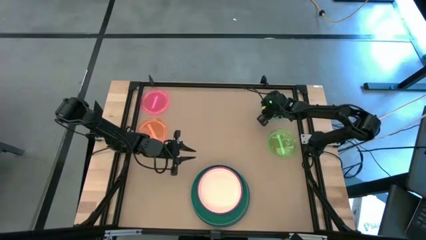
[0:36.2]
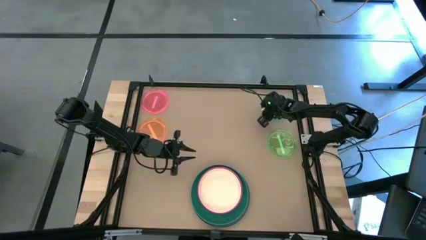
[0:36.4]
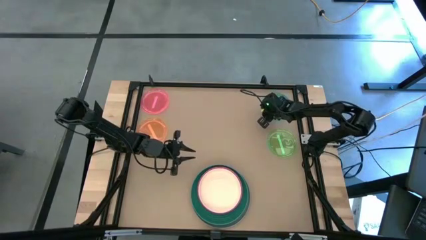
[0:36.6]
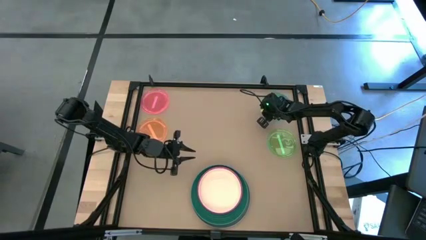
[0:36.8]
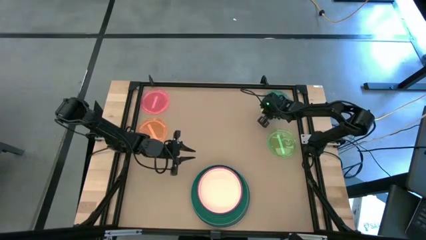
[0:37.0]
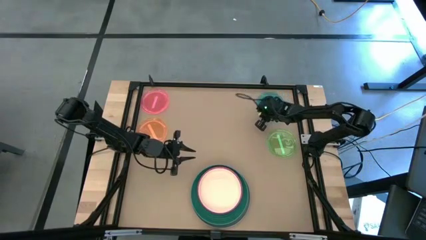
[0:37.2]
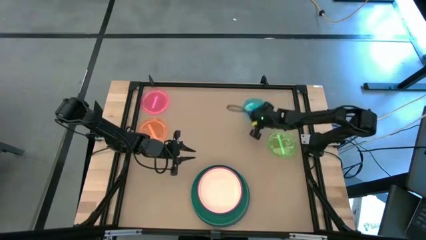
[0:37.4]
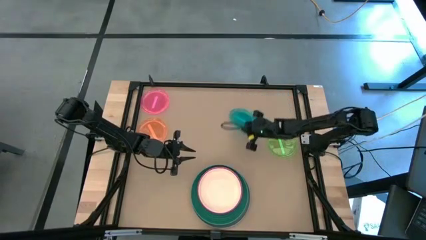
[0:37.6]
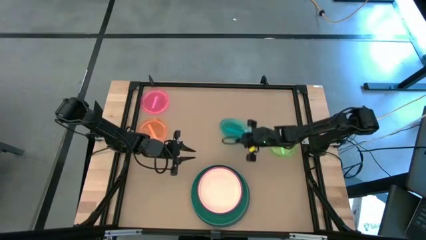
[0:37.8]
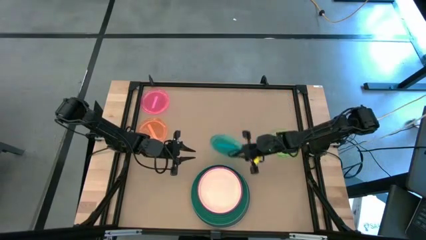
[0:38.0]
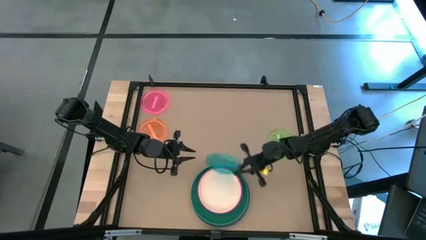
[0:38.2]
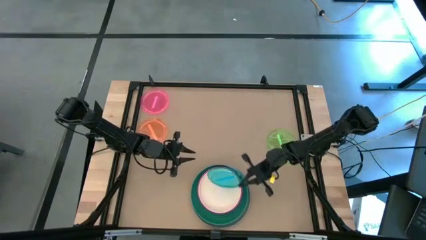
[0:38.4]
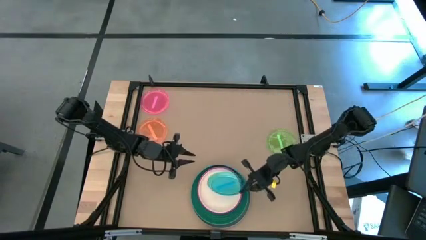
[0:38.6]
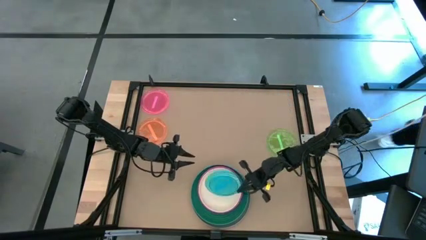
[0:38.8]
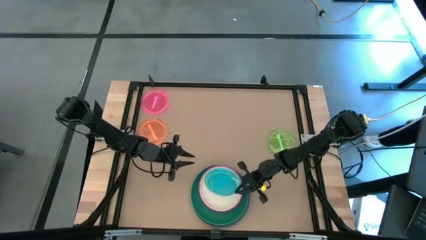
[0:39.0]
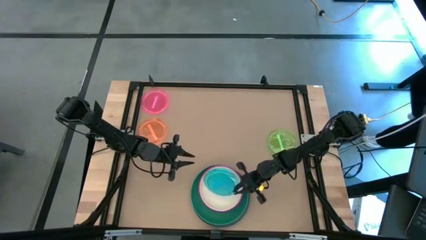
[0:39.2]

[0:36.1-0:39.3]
Task: Stack plastic plates
Stack the light blue plate on top of the light orange plate

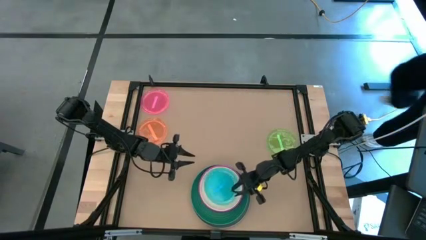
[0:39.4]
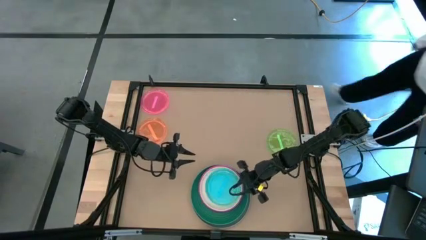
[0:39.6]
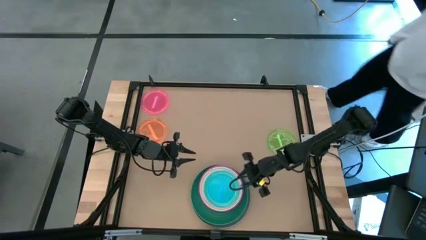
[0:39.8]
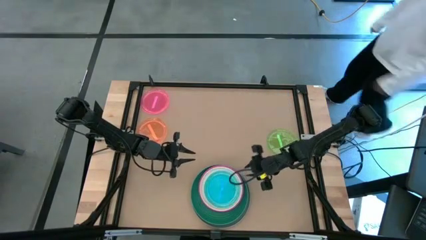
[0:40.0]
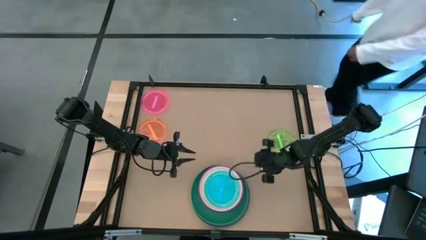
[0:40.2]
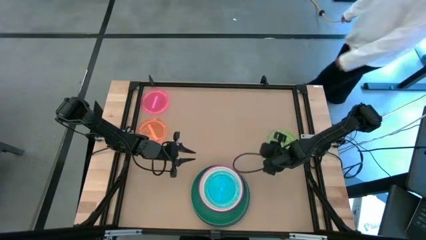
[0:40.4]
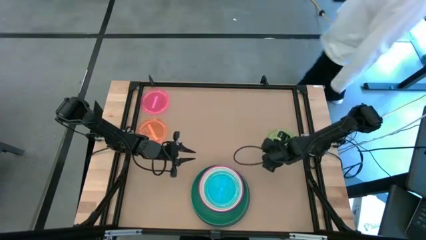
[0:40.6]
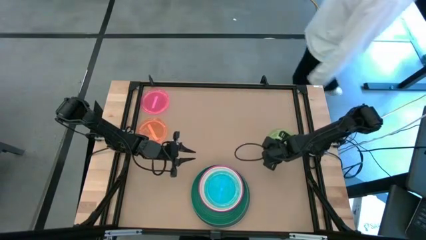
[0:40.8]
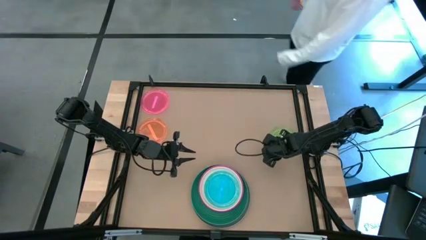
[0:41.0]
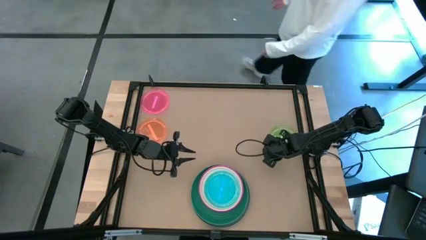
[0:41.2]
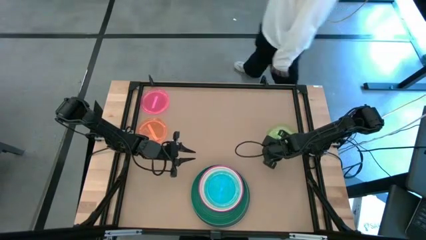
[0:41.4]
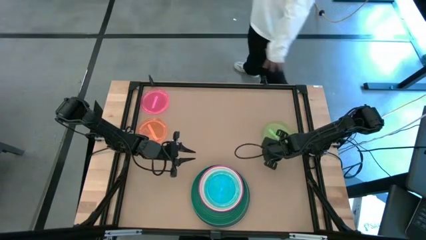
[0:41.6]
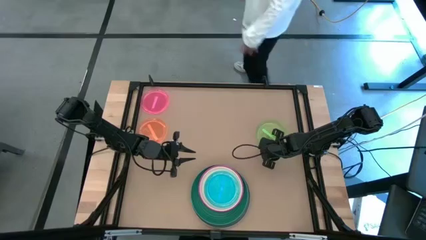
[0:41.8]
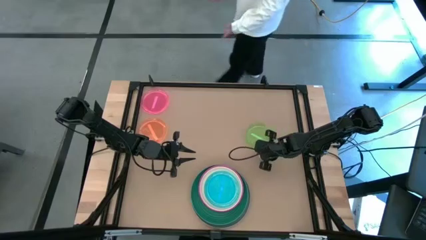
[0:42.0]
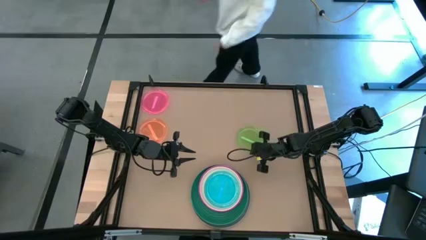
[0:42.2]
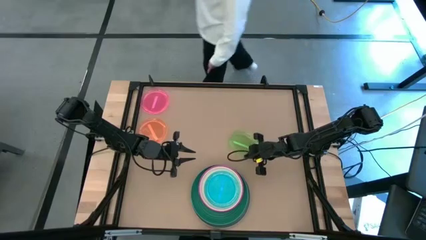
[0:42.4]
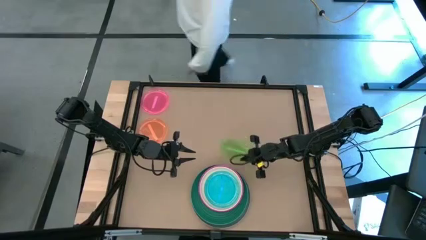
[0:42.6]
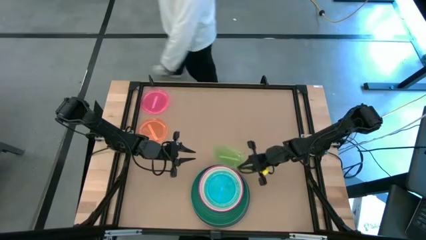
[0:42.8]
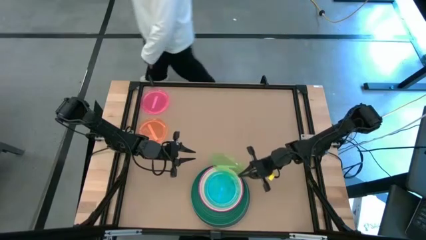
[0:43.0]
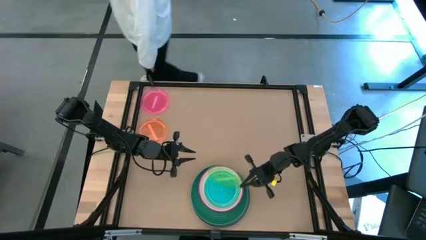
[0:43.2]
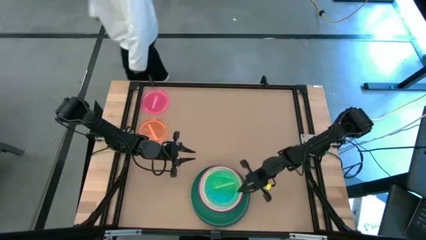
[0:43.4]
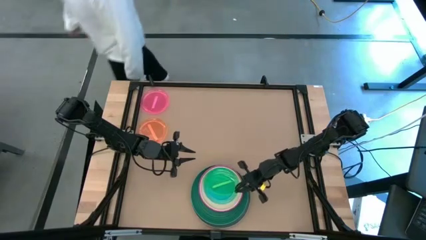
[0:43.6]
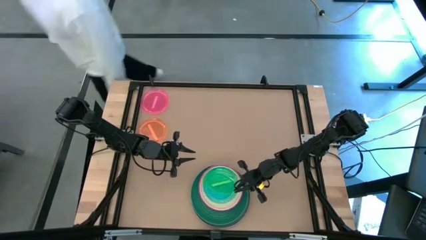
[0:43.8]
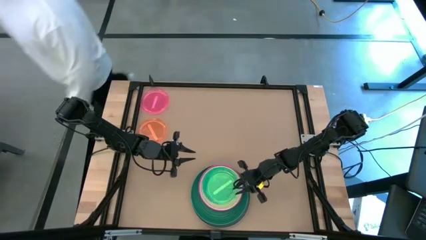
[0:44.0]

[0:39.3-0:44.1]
Stack the light green plate on top of the light blue plate

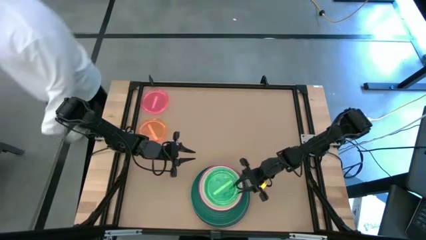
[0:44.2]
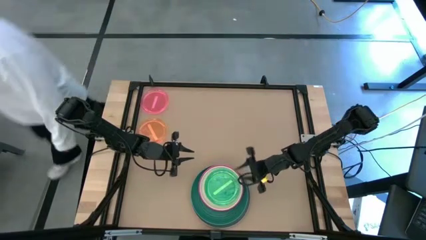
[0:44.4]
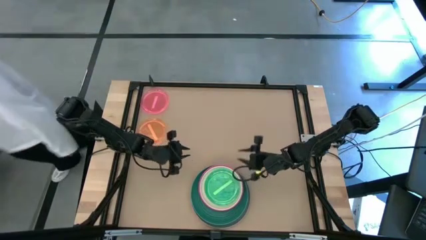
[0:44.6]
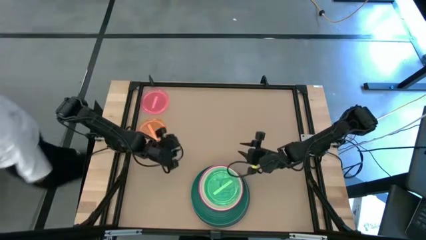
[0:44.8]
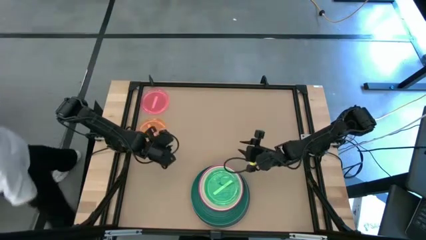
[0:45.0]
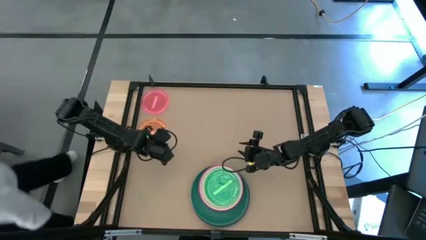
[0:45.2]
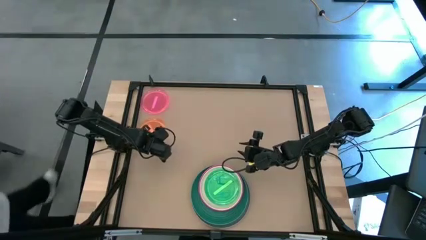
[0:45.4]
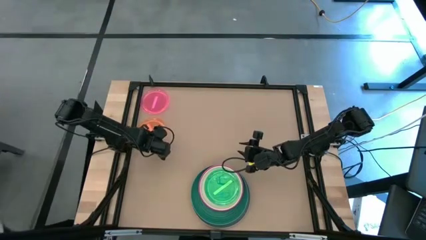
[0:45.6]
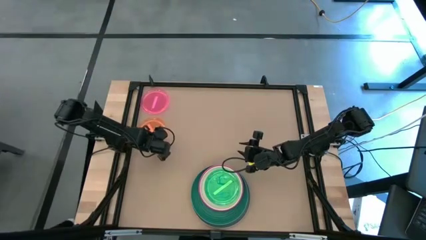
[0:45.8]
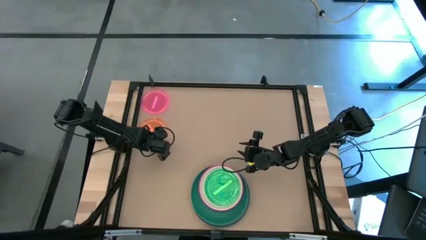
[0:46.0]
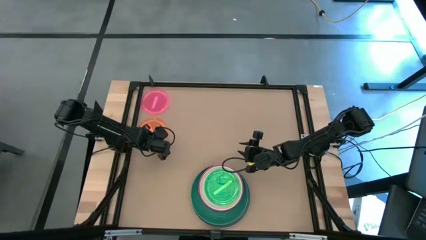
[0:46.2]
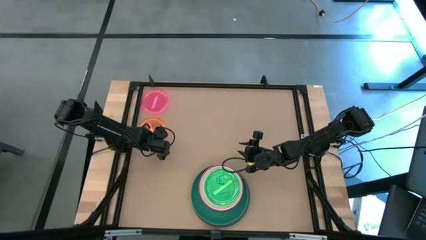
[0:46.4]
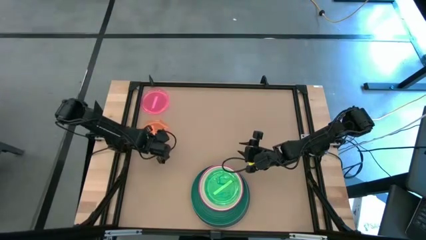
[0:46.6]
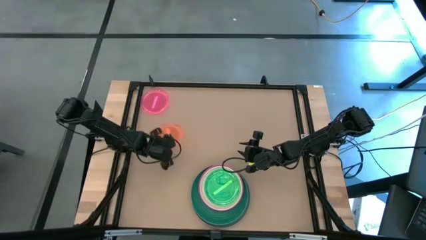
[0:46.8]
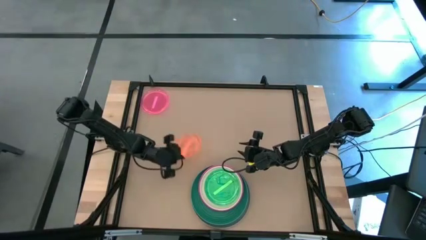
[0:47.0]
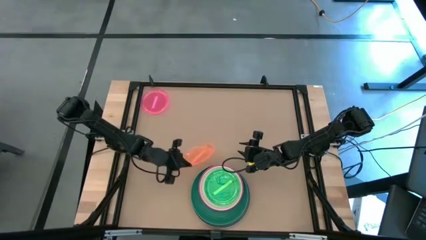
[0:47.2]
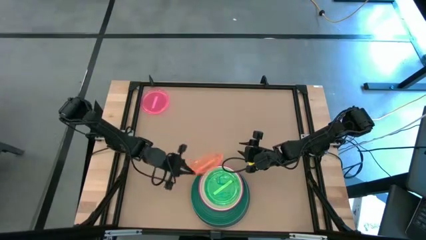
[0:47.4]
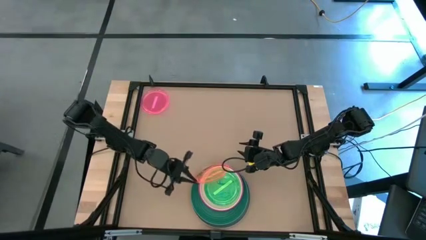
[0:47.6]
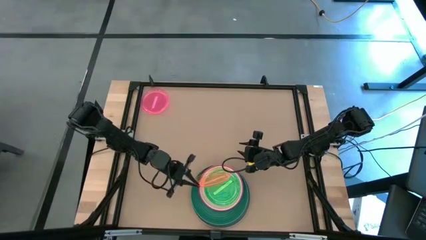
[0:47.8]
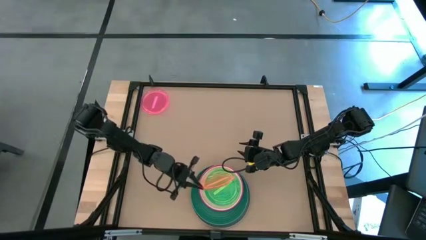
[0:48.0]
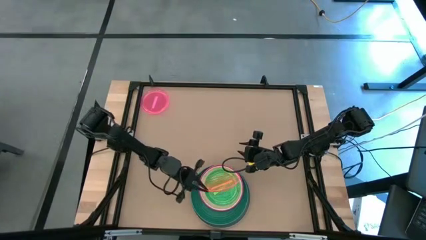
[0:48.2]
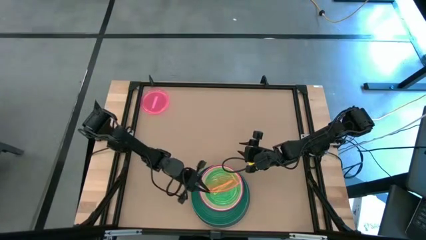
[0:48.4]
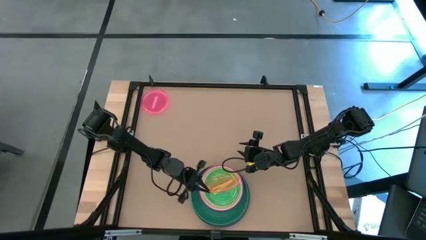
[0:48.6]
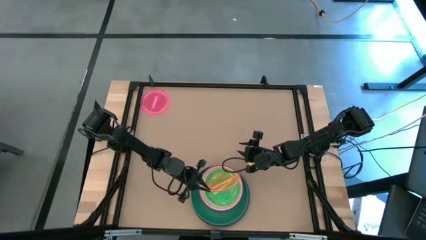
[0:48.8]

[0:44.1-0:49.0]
Stack the orange plate on top of the light green plate

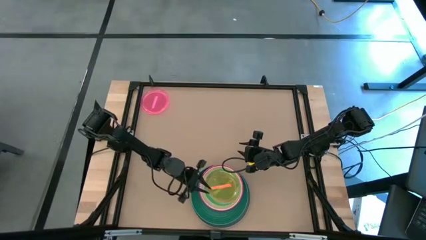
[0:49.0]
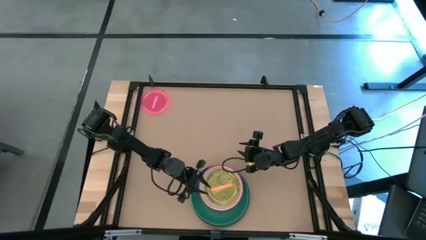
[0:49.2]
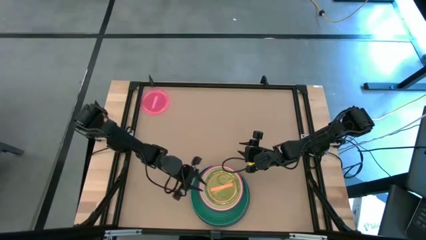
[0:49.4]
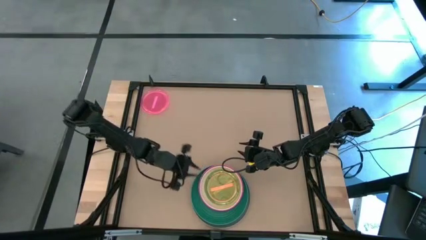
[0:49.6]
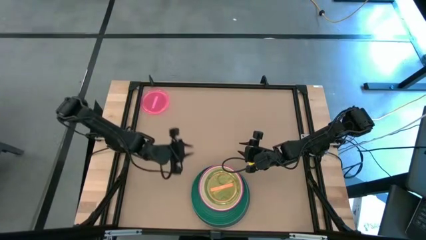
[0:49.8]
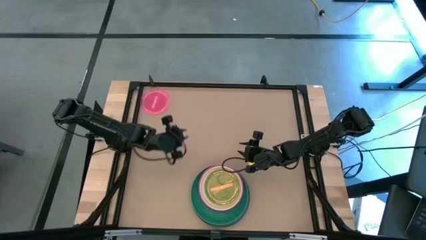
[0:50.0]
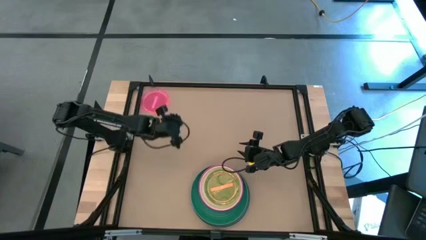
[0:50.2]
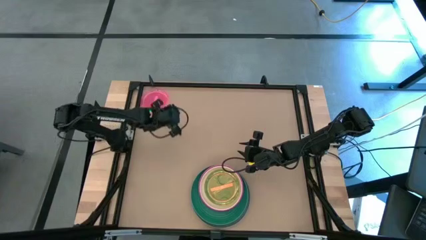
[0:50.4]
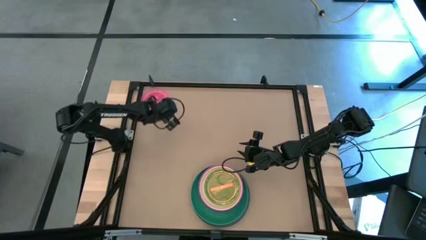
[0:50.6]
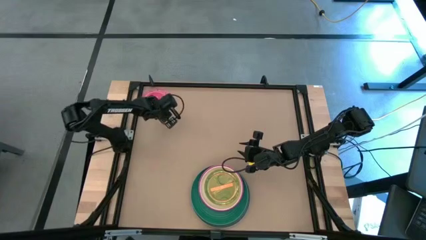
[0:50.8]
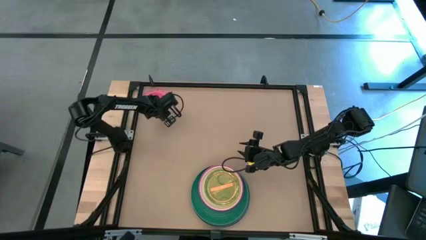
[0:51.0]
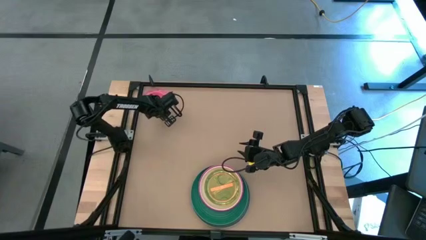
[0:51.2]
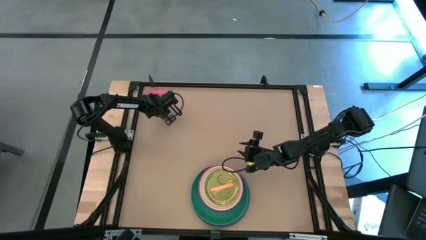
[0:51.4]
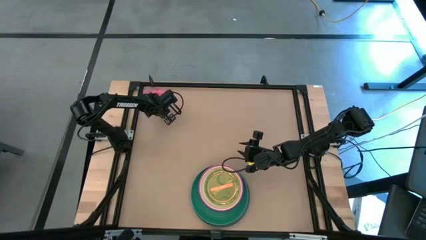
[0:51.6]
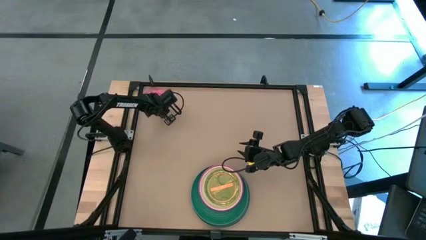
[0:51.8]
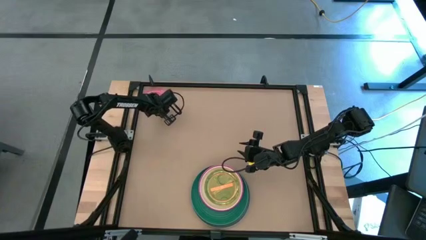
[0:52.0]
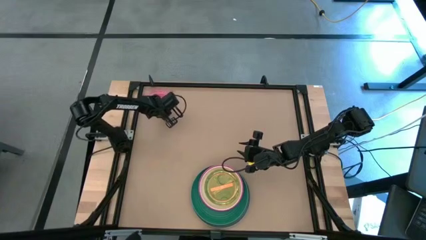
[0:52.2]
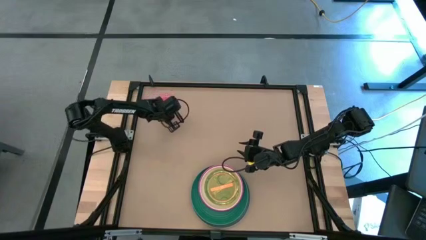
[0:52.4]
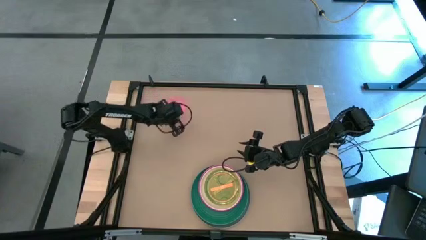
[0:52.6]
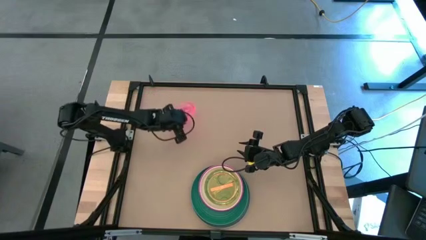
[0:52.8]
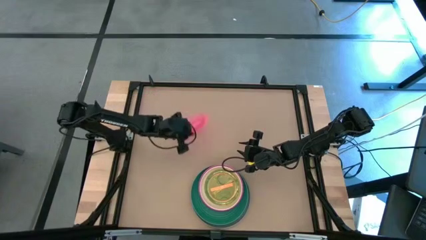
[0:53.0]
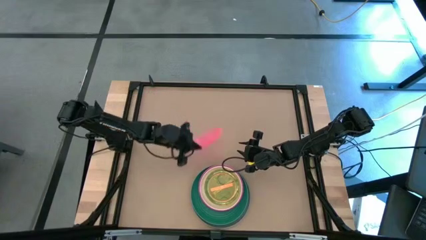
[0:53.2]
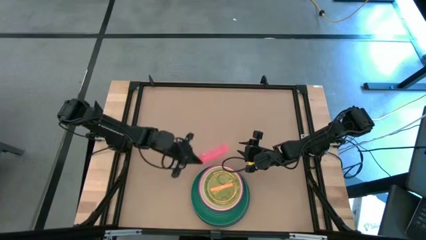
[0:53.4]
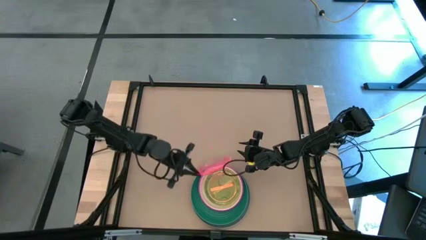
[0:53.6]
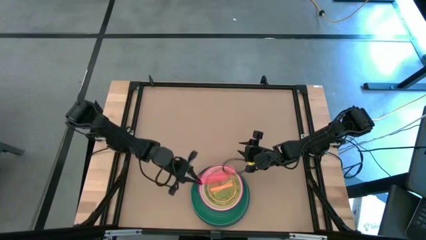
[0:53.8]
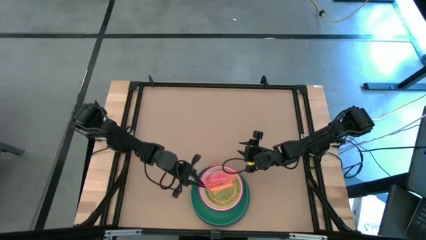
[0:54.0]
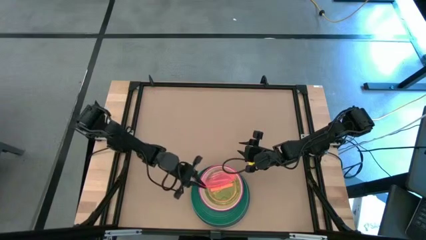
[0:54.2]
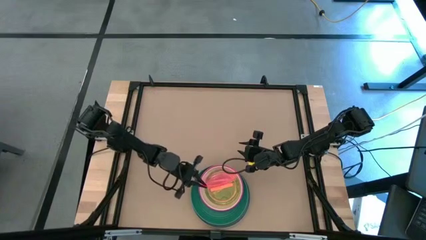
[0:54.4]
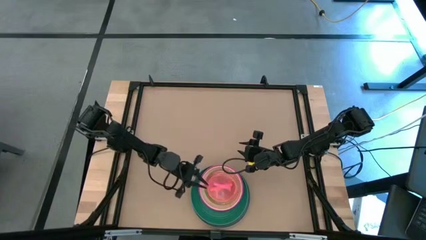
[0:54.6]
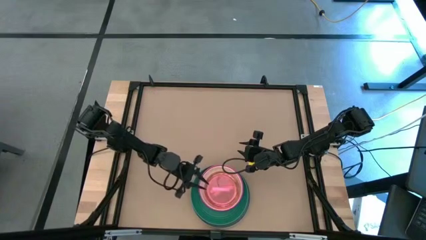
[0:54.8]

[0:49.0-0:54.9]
Stack the red plate on top of the orange plate
